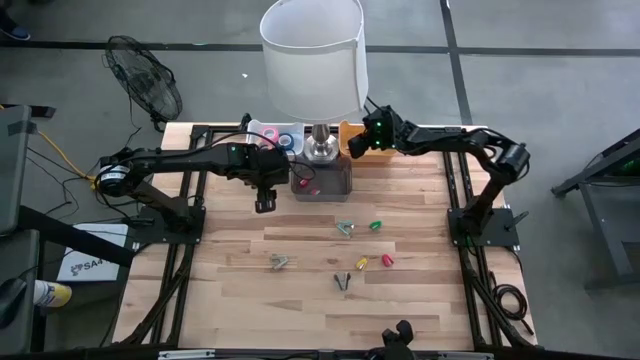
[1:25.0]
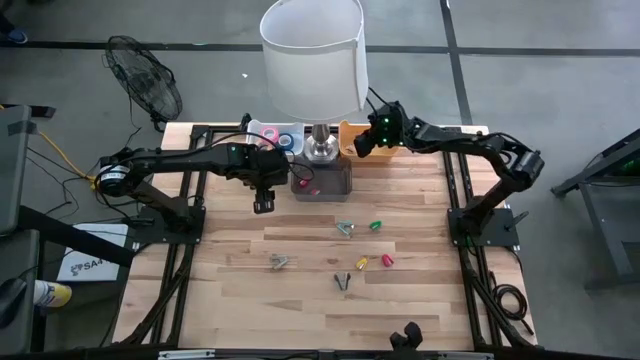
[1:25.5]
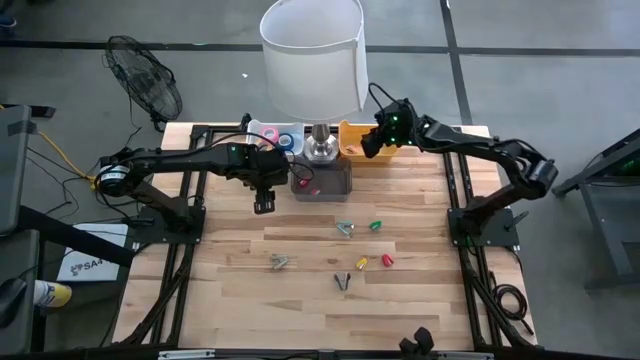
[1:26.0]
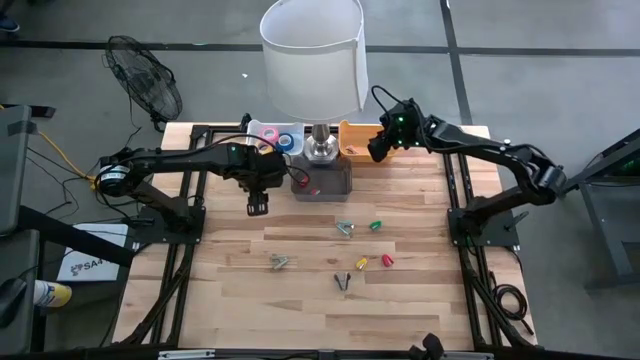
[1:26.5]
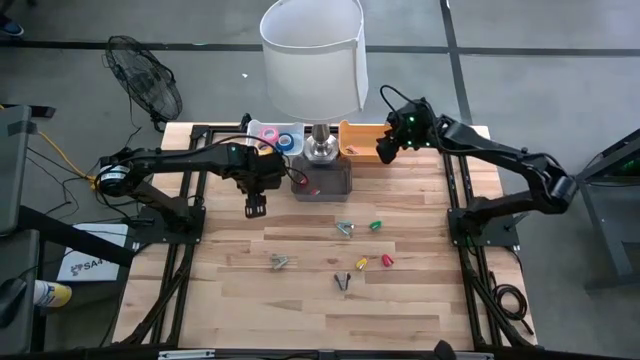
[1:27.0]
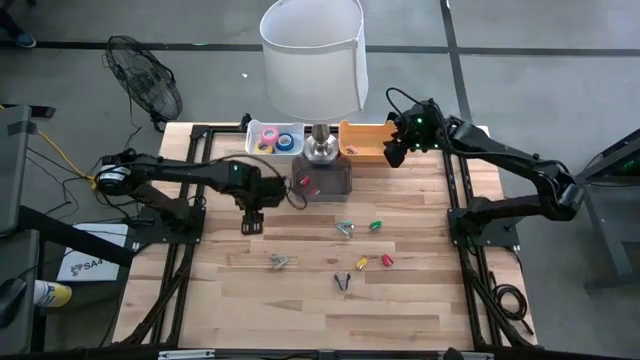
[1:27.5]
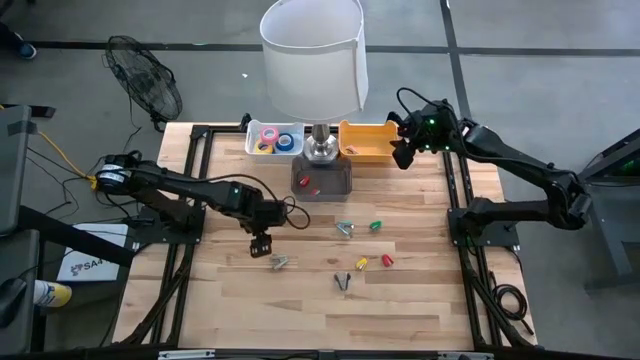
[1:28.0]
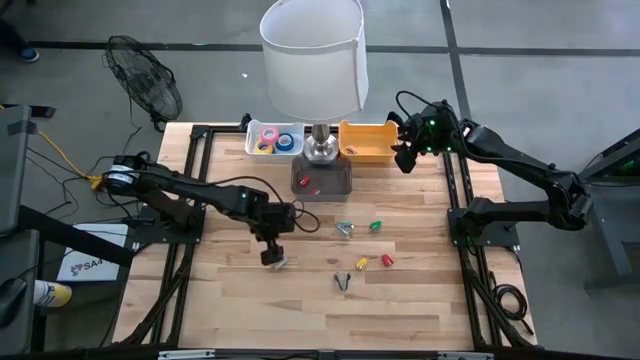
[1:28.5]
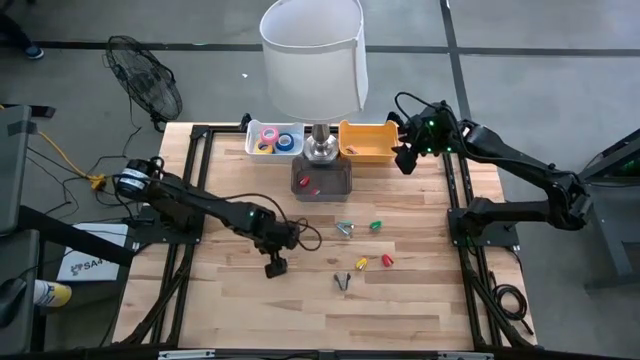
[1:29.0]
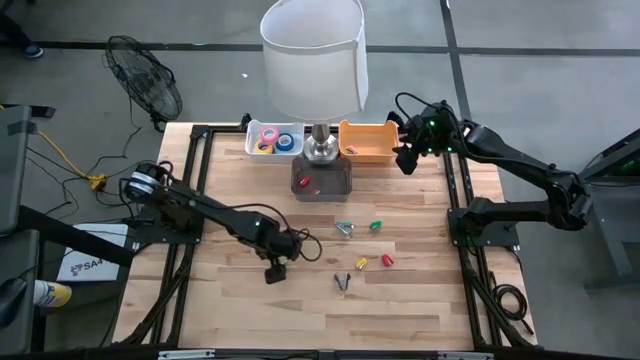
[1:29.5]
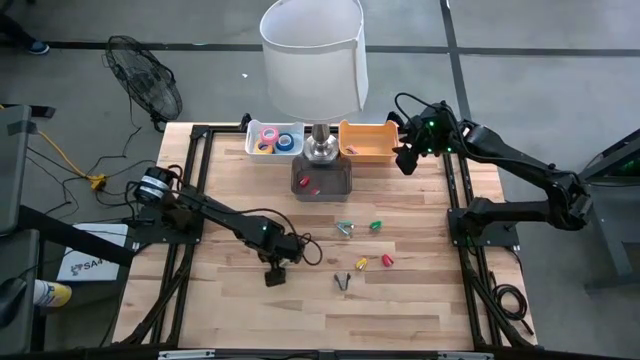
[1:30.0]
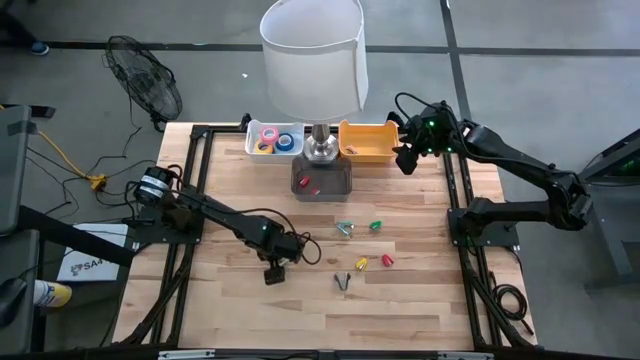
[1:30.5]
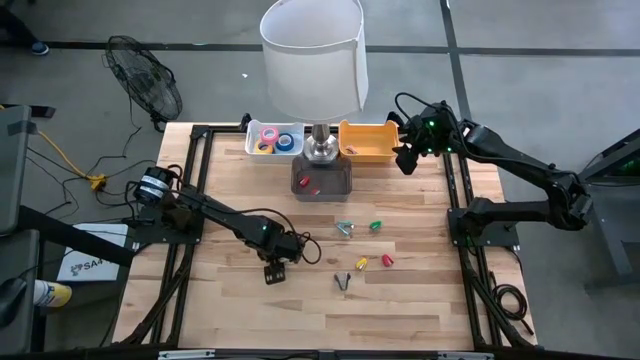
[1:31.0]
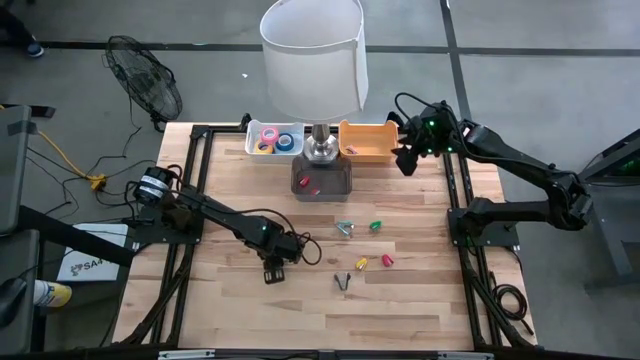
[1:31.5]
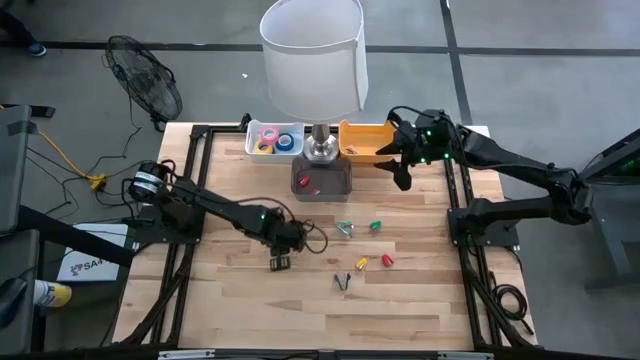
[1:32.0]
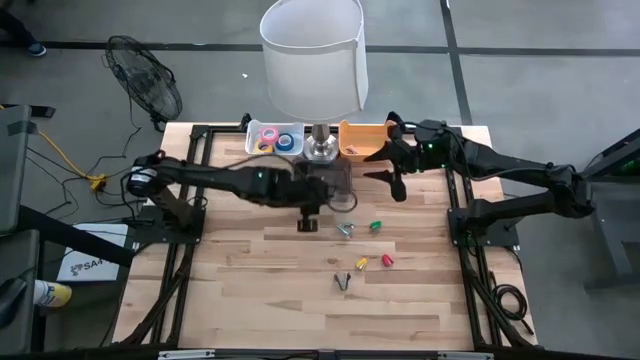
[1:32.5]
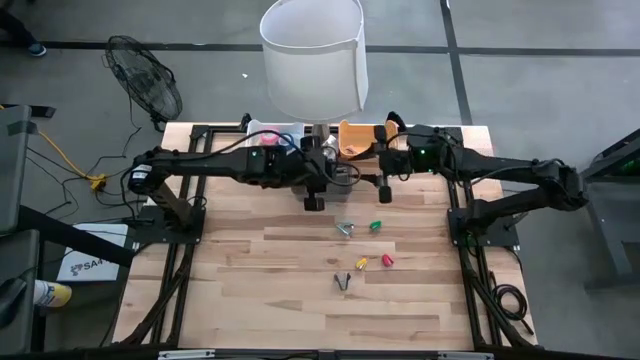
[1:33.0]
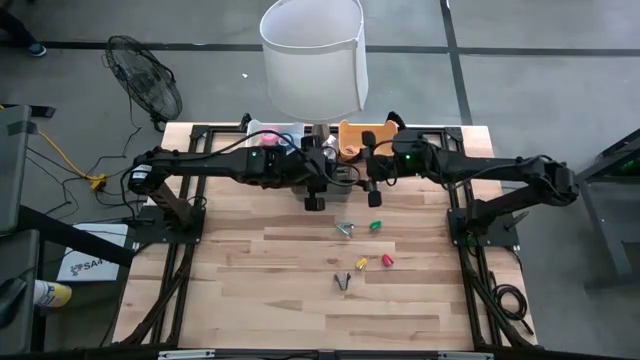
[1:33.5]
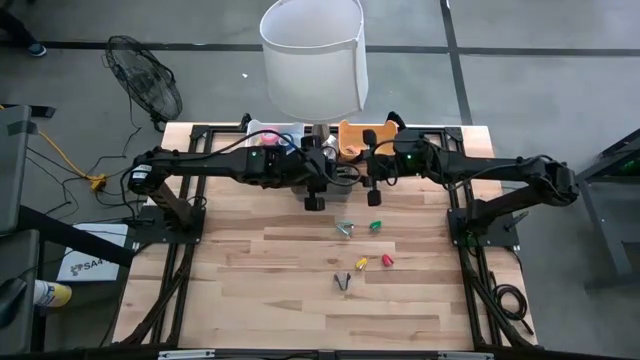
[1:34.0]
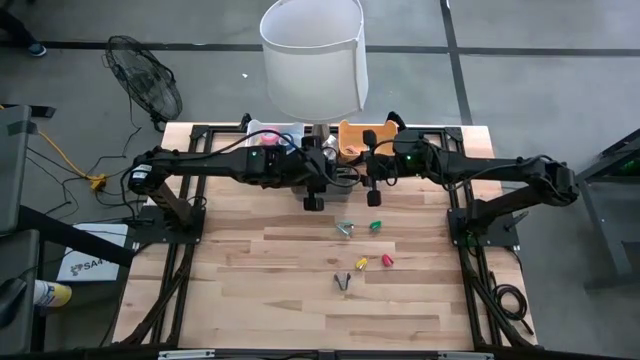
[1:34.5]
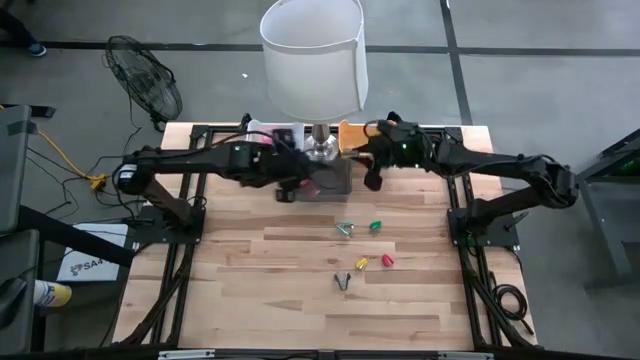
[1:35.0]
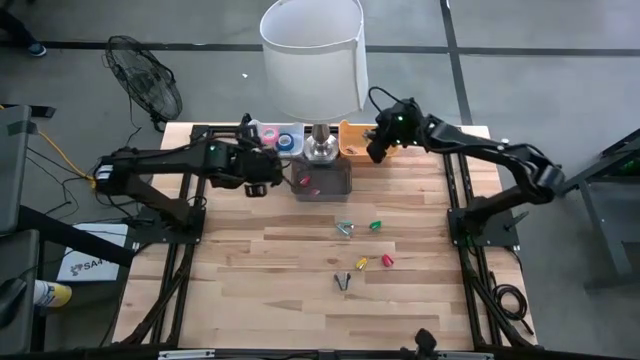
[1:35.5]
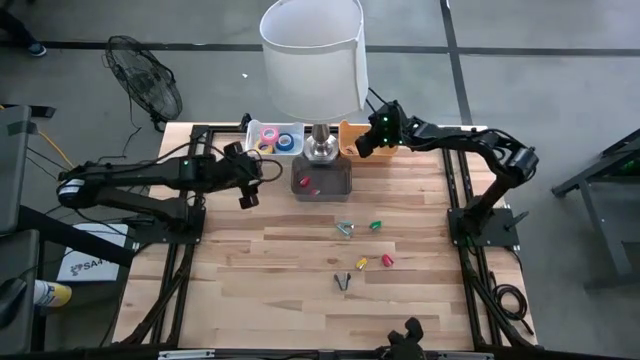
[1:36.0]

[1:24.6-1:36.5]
Task: Pick and place Stapler, Stapler remover, tape
Put the gray staple remover into the yellow bin

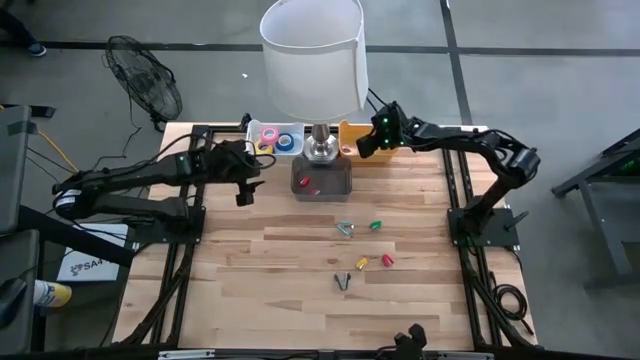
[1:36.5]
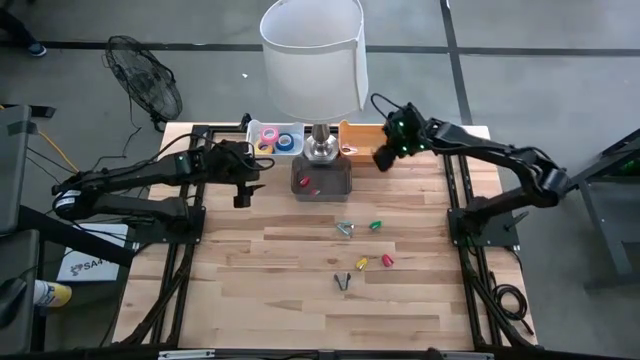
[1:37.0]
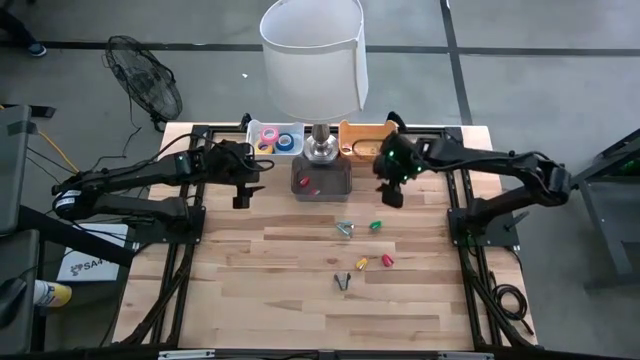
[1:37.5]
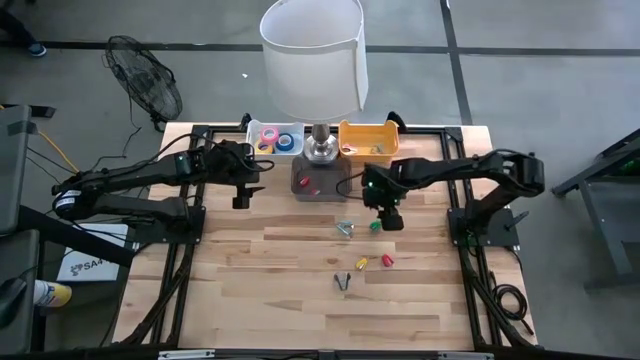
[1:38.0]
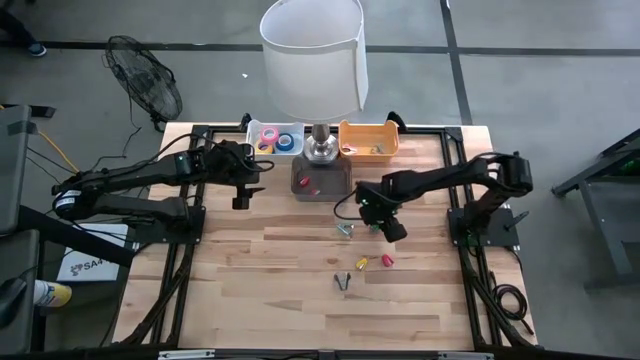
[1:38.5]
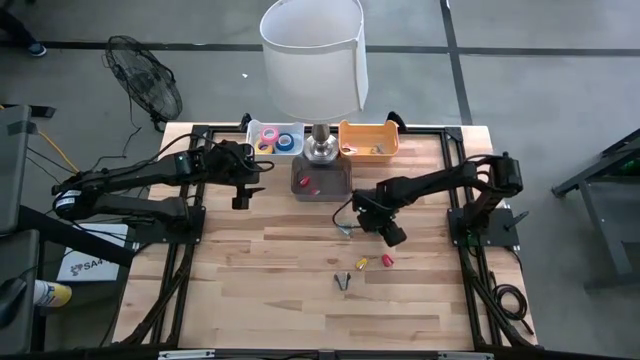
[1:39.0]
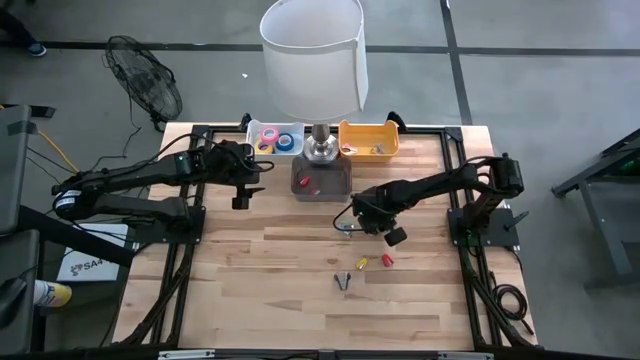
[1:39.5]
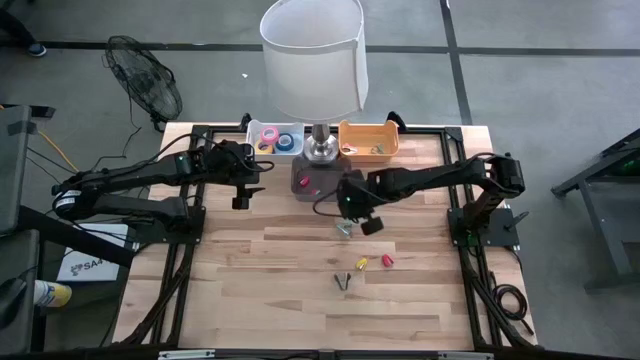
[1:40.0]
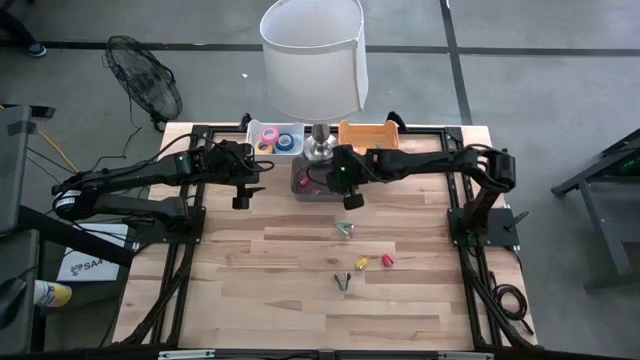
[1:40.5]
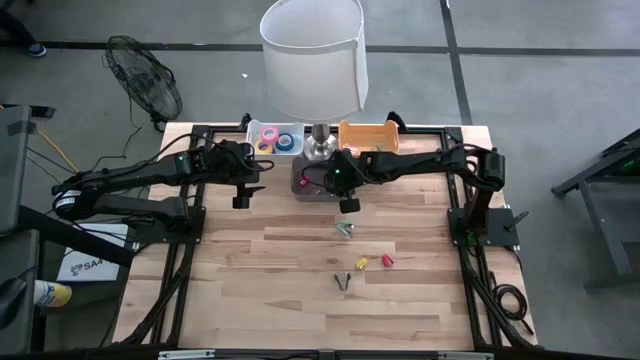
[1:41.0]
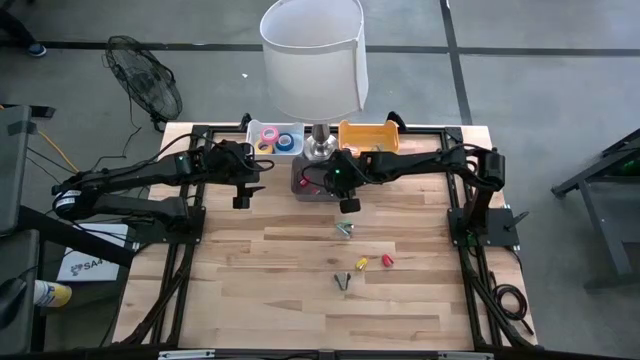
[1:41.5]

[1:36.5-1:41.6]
Put the green stapler into the black bin

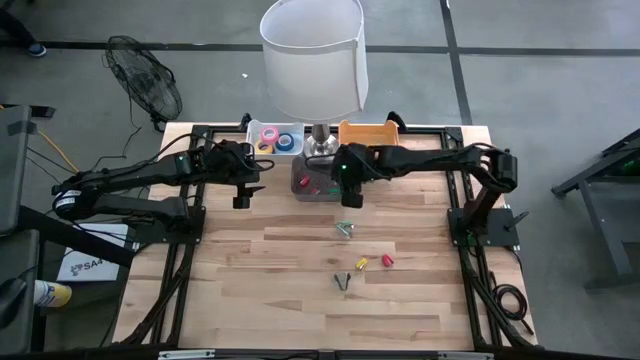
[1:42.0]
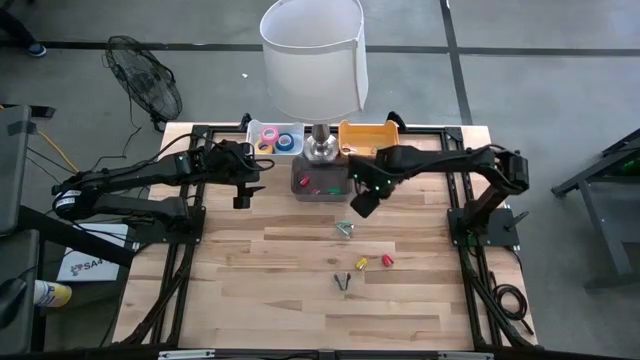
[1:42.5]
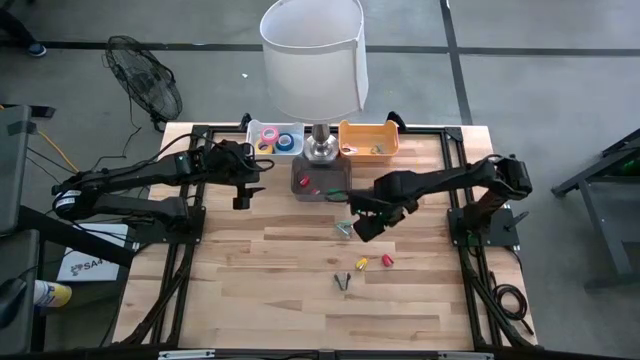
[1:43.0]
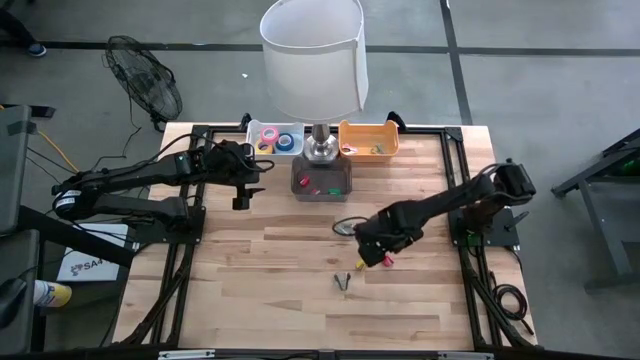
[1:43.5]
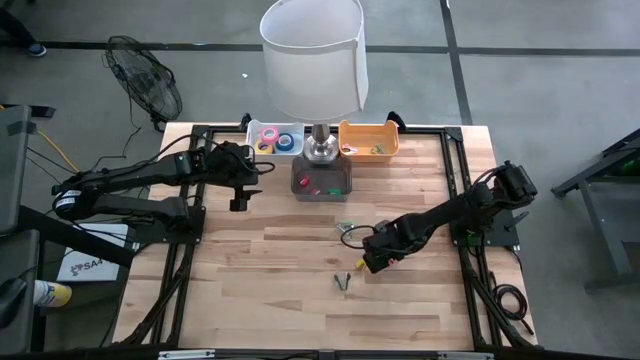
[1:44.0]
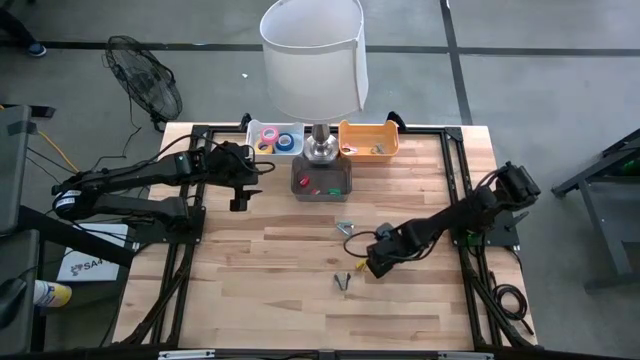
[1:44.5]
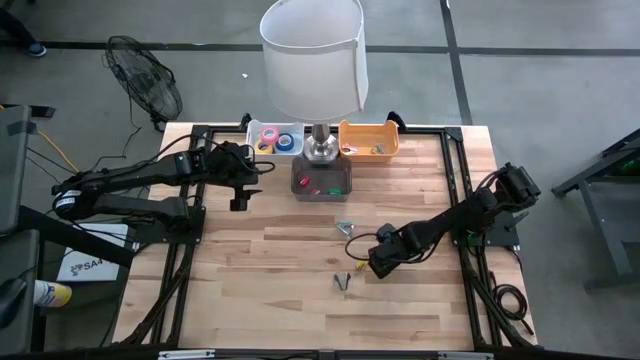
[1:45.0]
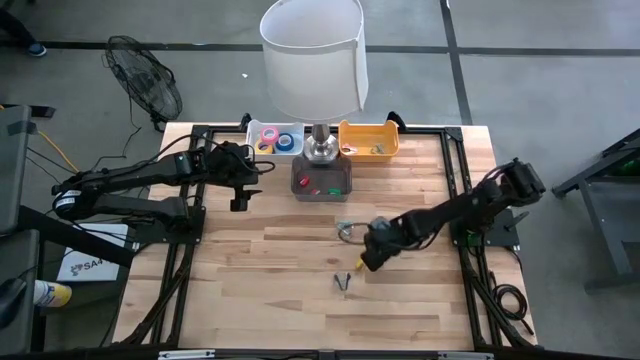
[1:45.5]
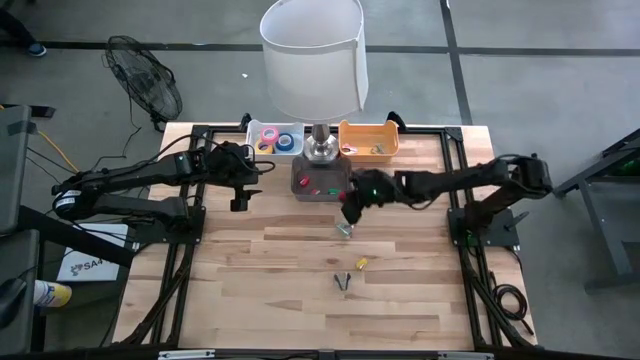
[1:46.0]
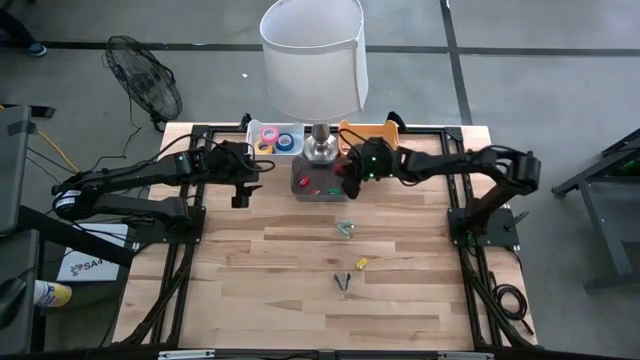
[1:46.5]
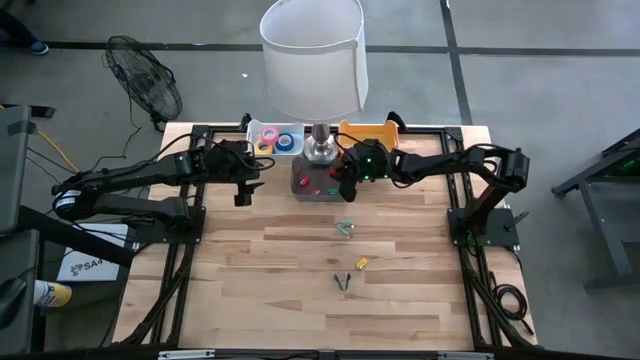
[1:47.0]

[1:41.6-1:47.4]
Put the red stapler into the black bin
